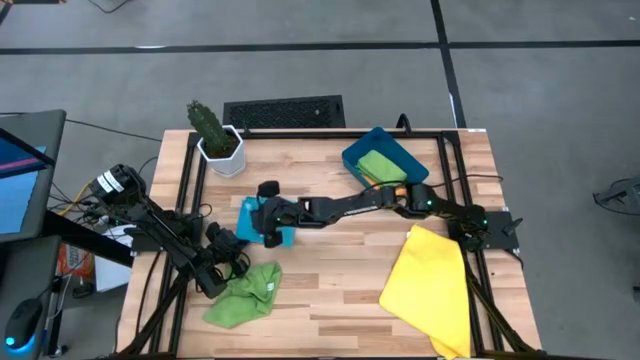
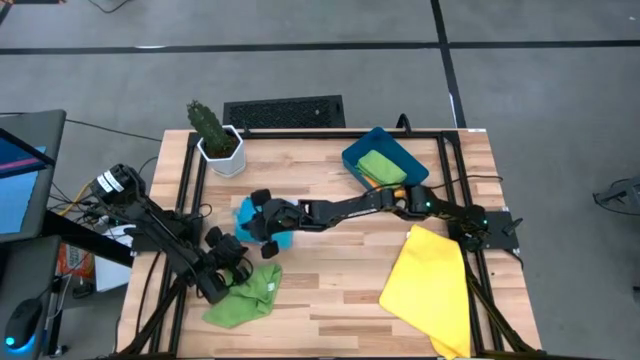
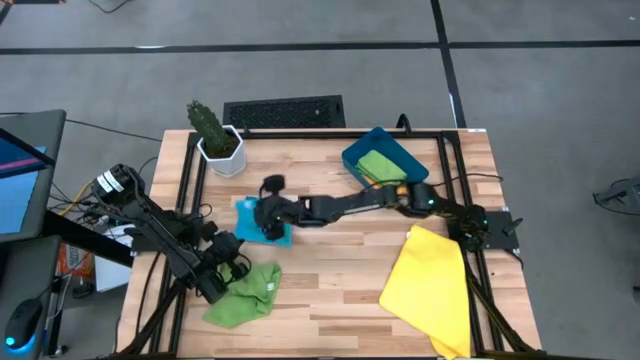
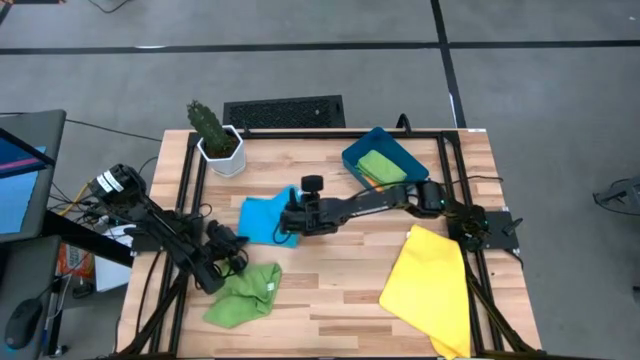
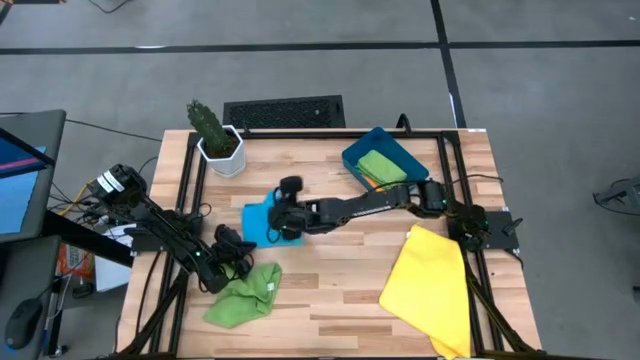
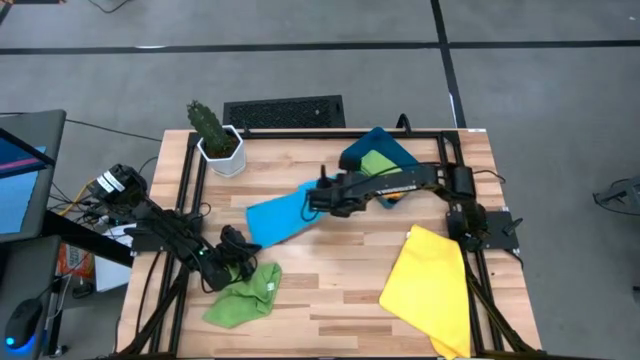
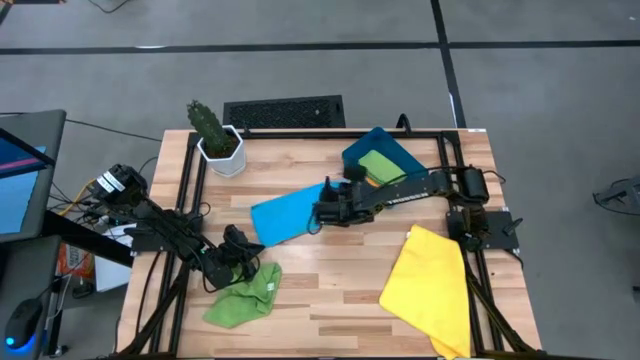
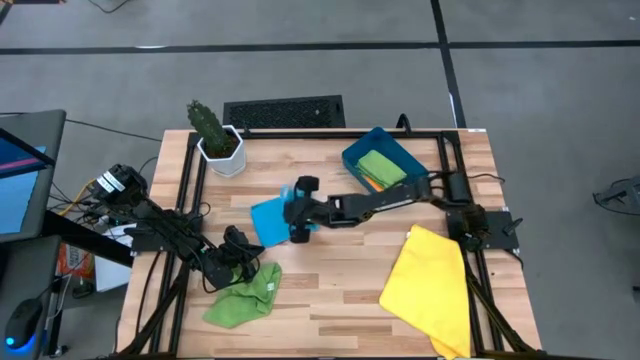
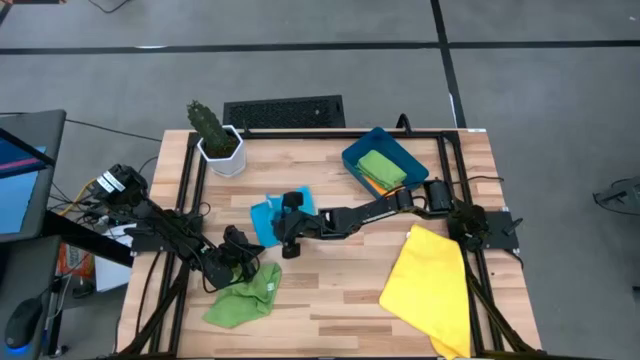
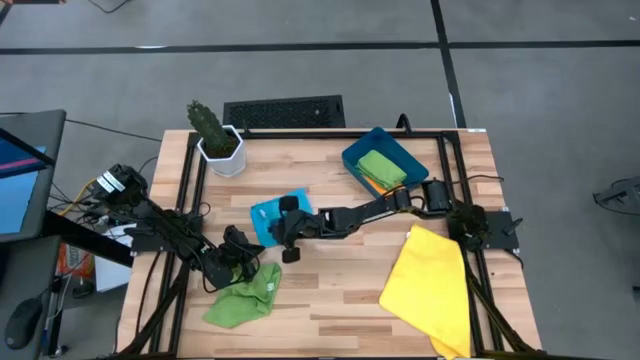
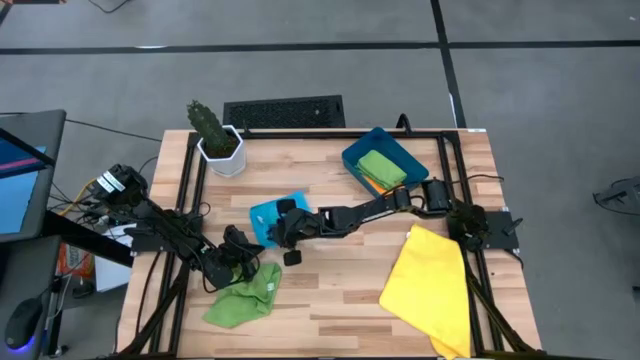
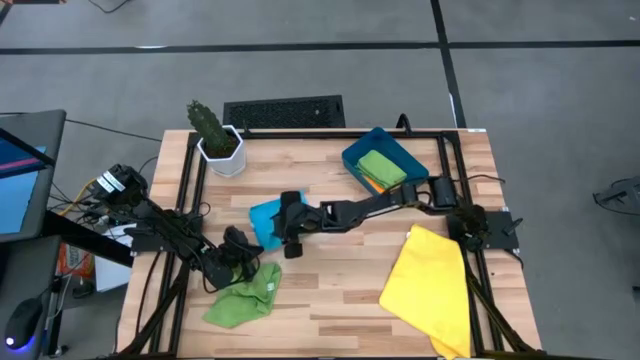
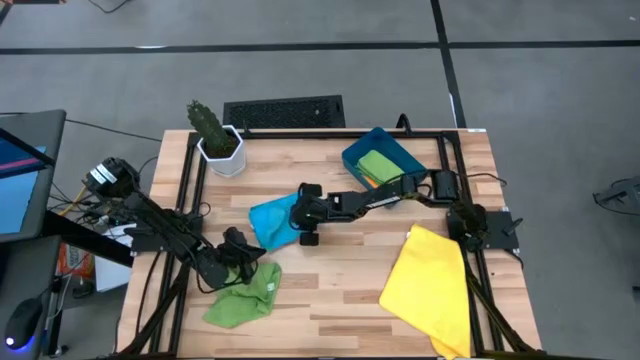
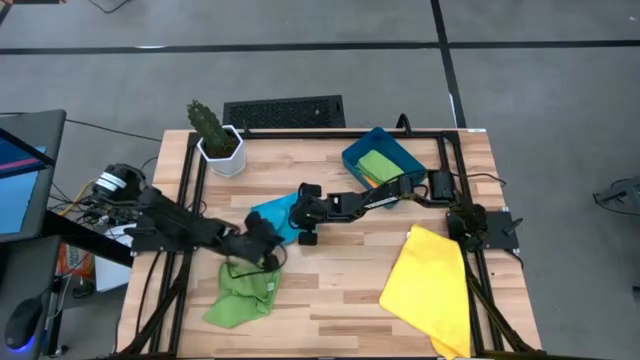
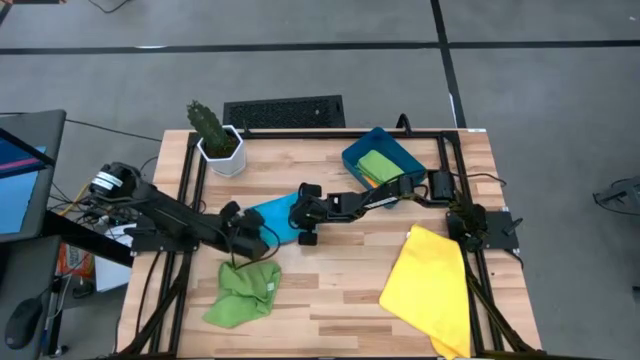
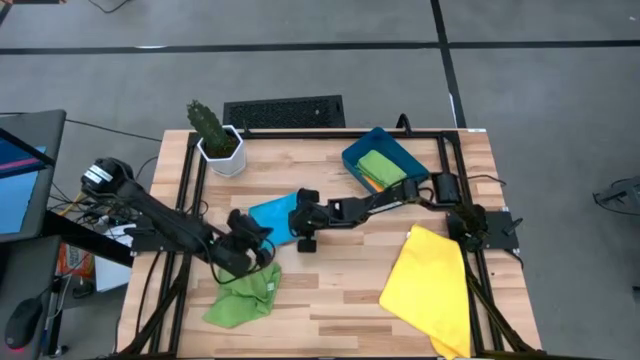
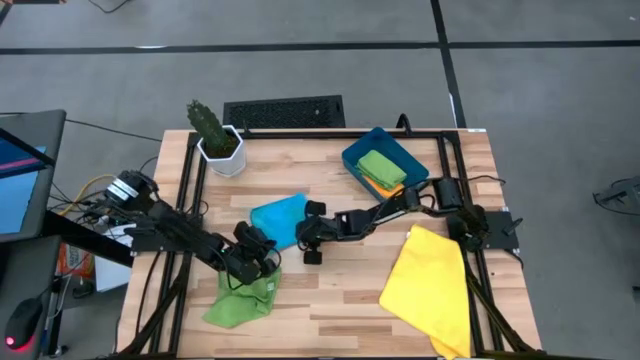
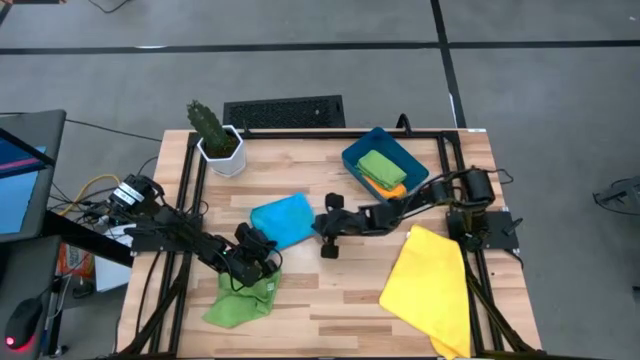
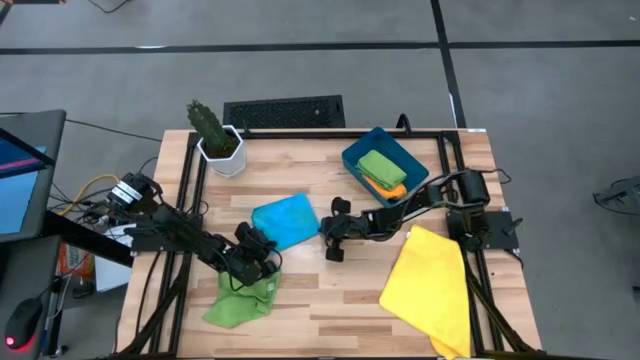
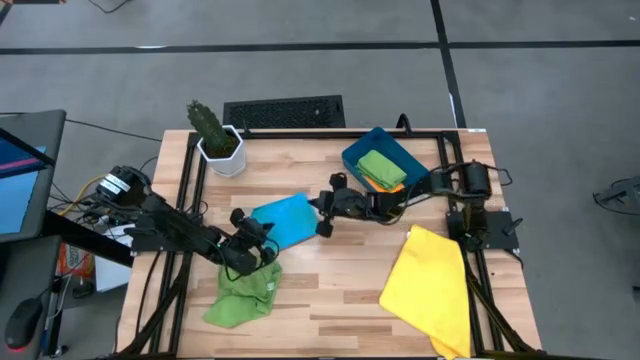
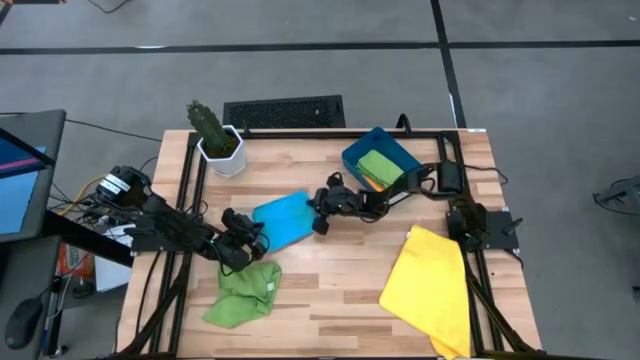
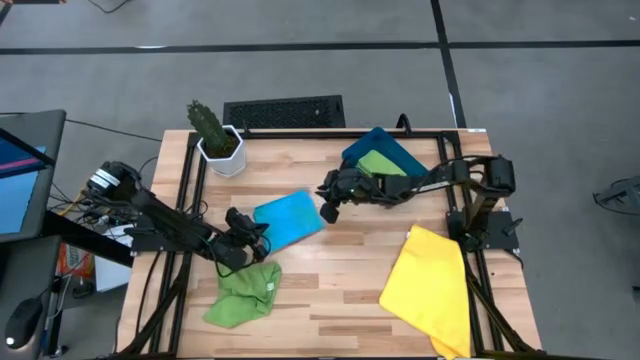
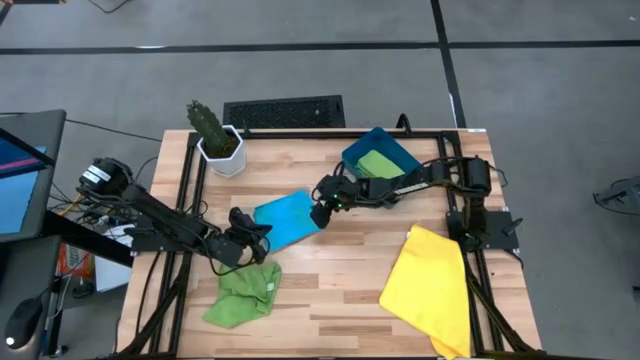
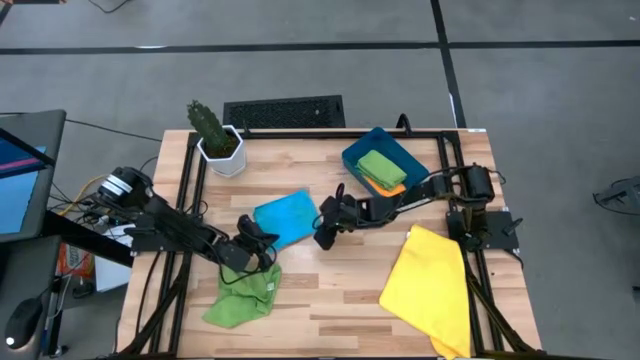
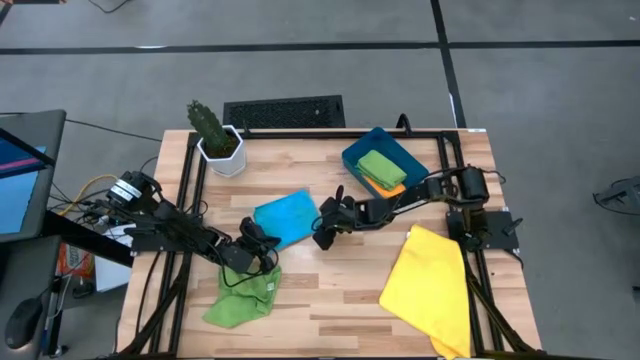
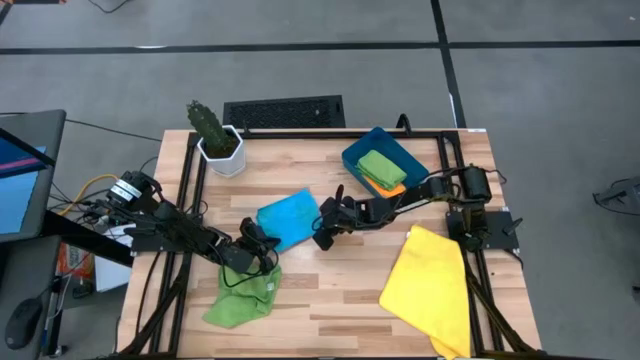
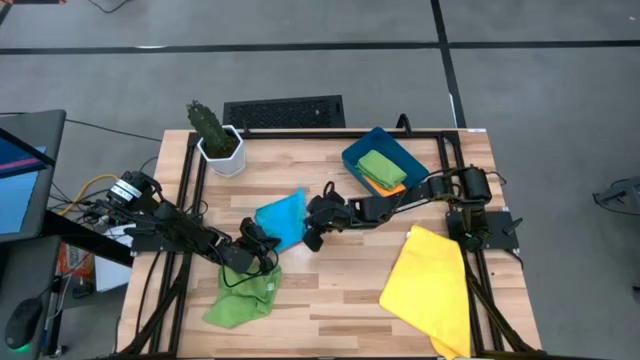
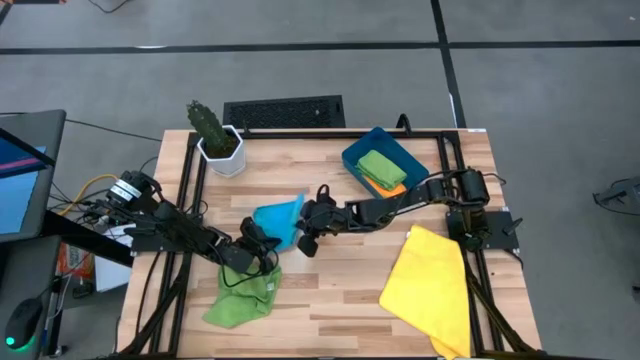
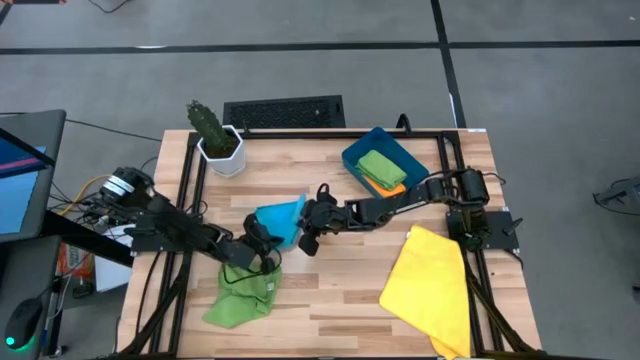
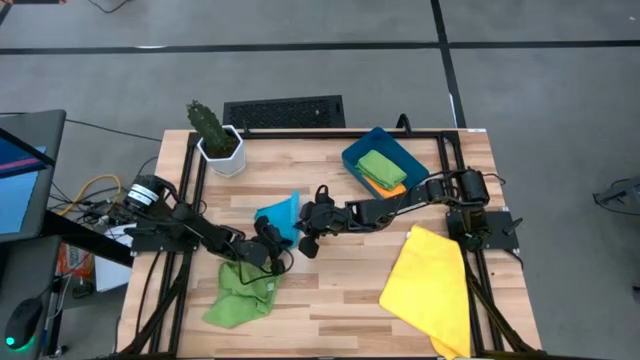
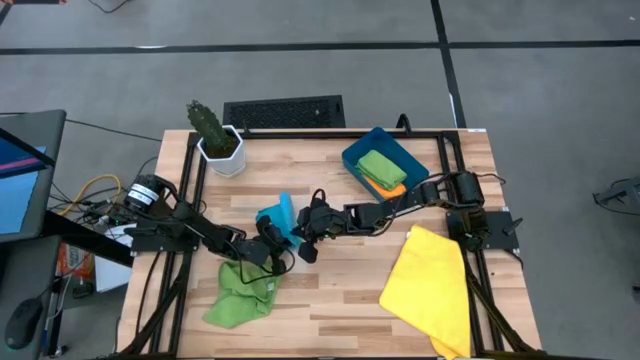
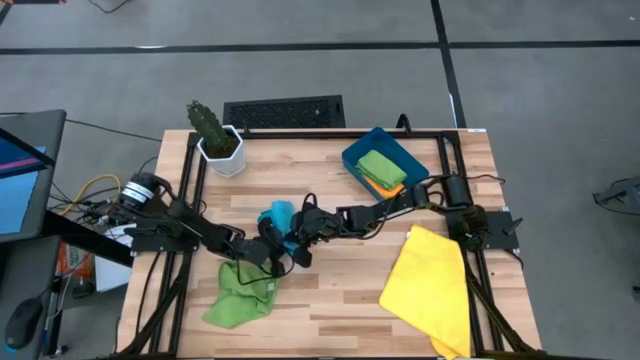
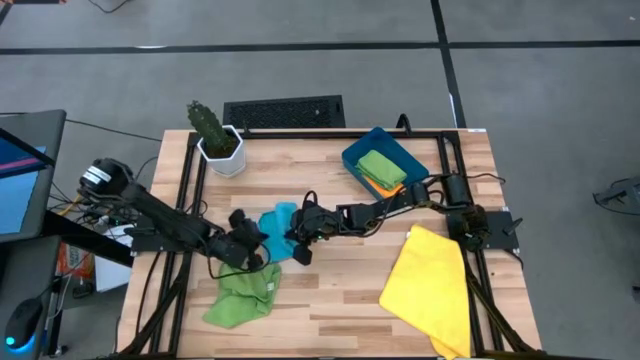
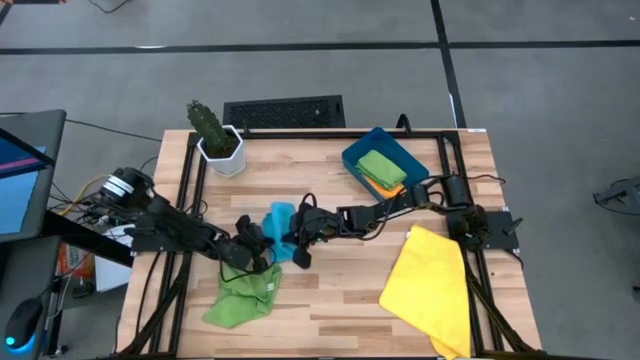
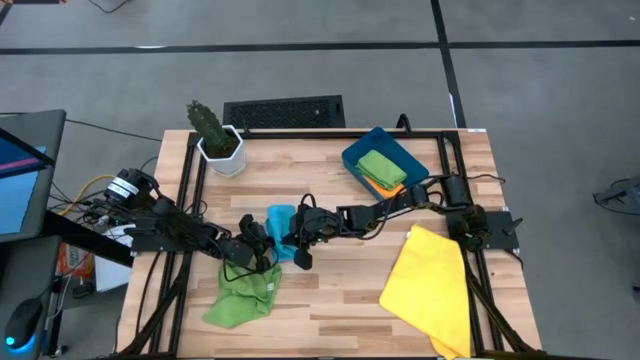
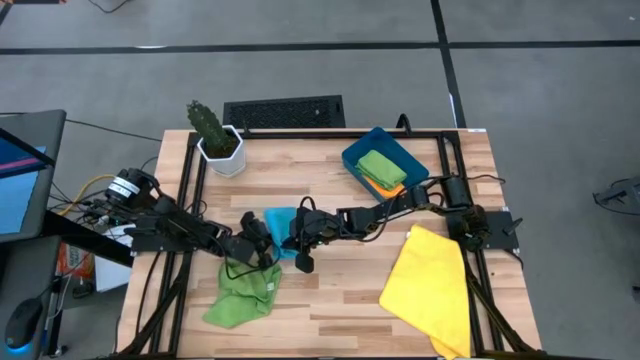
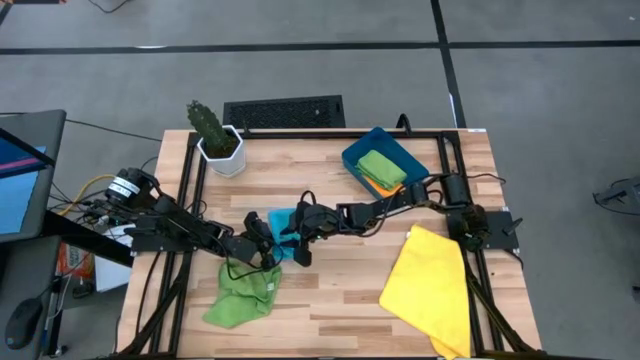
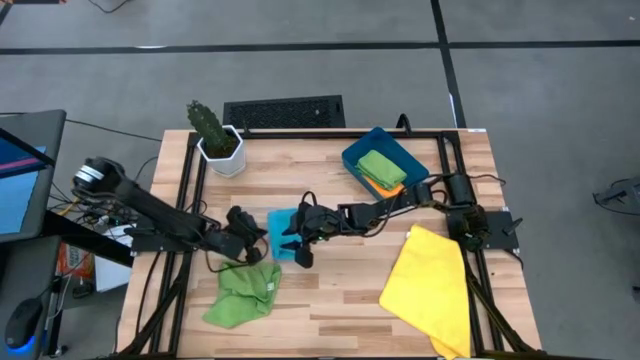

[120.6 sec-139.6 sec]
Task: Fold microfiber towels
Fold the blue microfiber towel

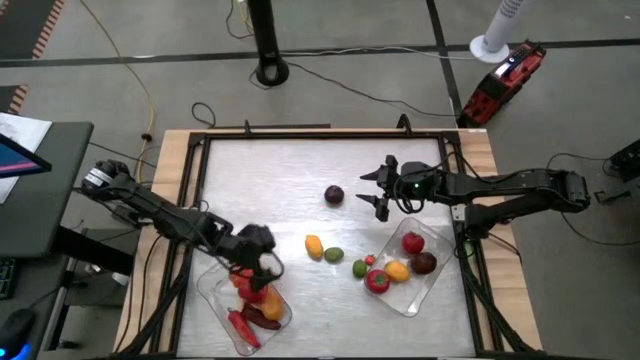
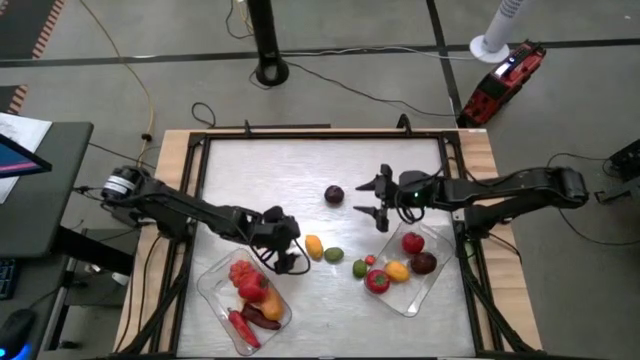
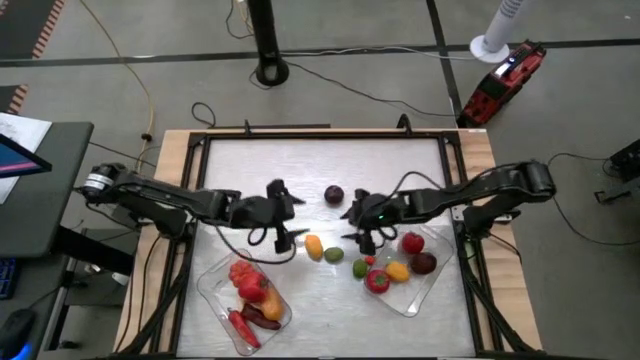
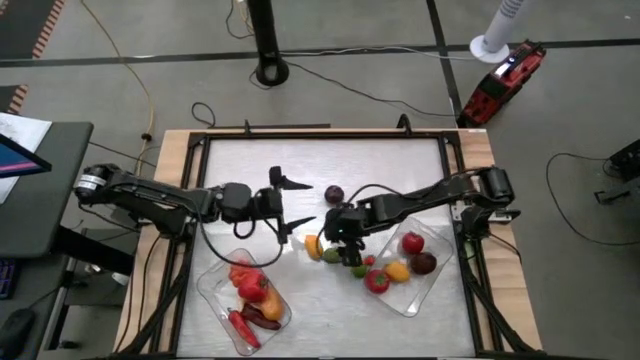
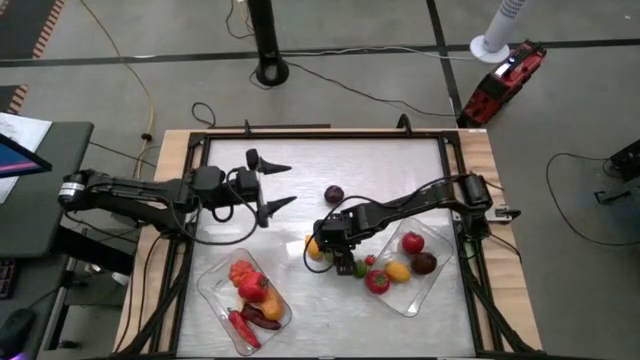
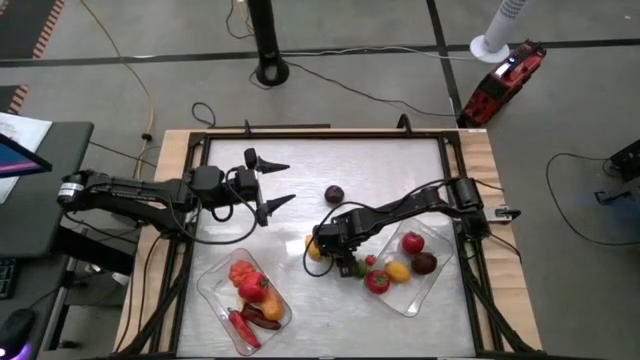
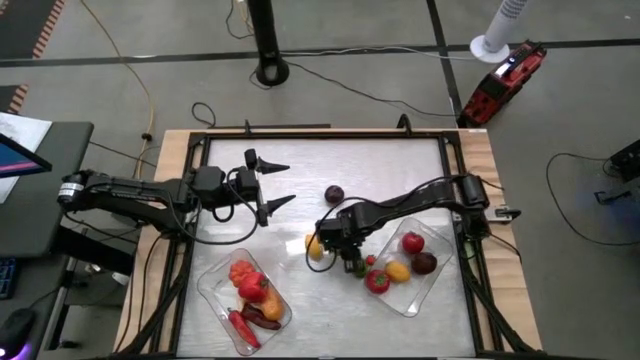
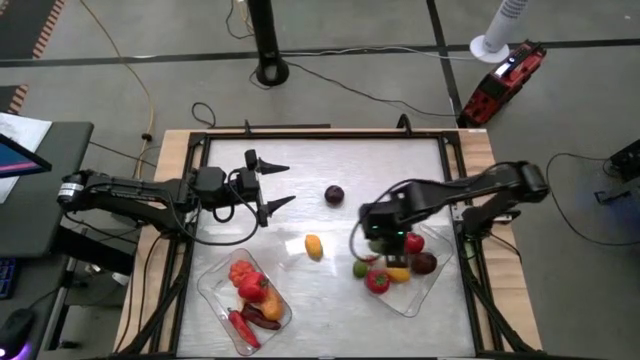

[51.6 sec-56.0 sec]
Task: Sort produce into baskets
Put the left green lime into the right transparent bin
